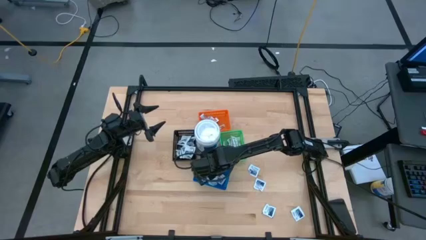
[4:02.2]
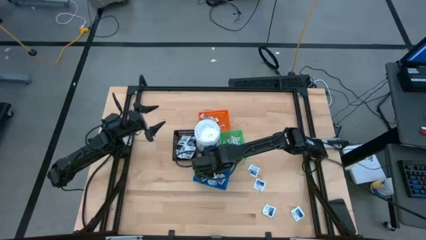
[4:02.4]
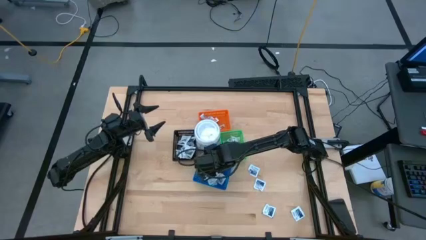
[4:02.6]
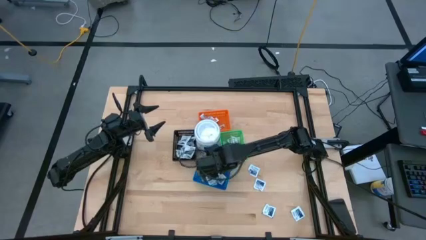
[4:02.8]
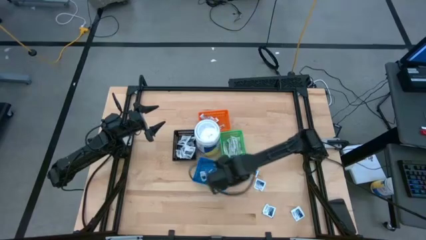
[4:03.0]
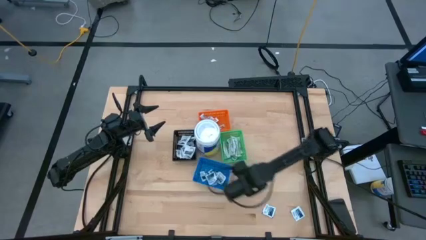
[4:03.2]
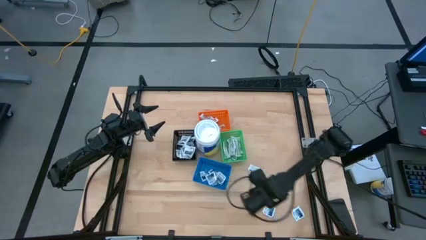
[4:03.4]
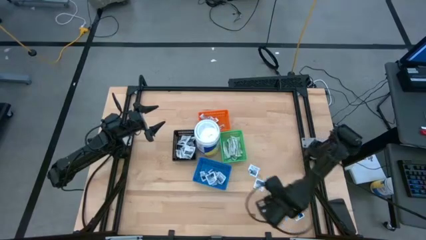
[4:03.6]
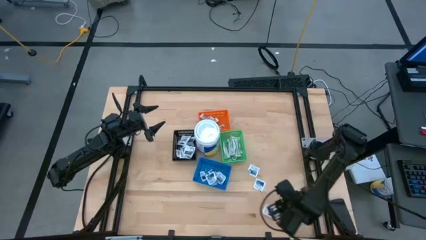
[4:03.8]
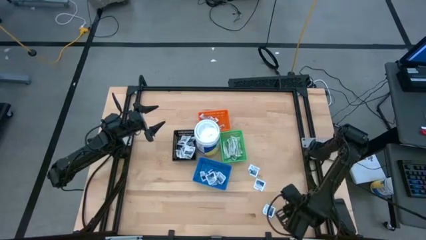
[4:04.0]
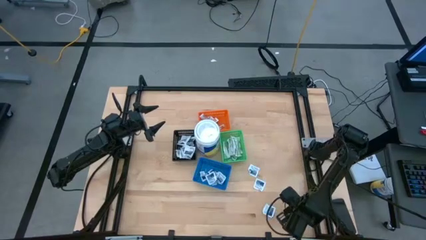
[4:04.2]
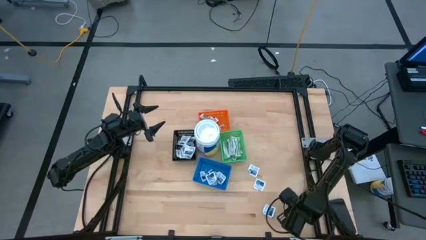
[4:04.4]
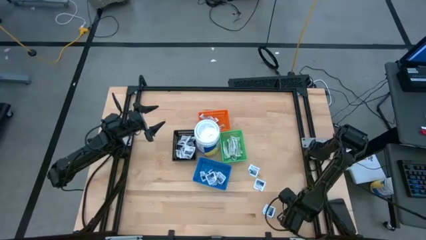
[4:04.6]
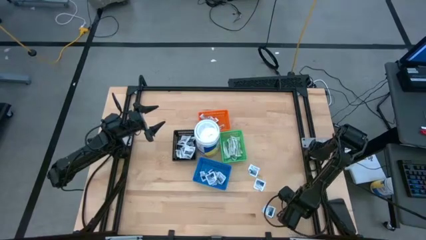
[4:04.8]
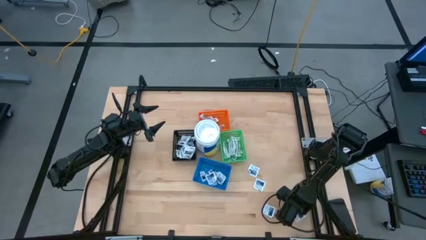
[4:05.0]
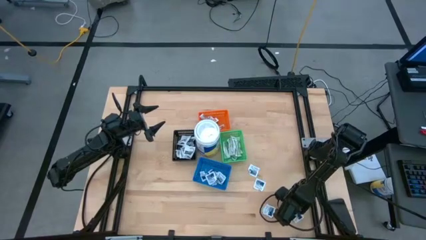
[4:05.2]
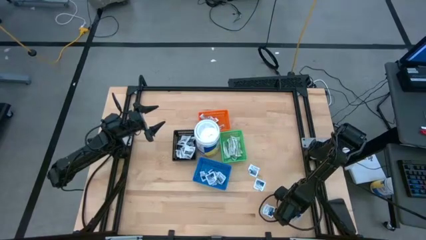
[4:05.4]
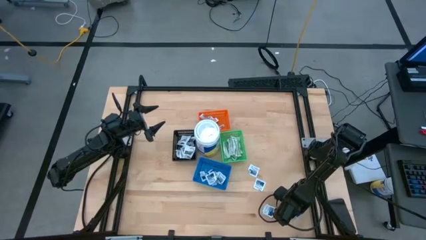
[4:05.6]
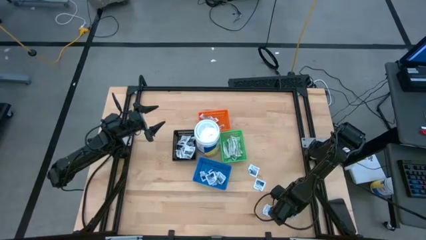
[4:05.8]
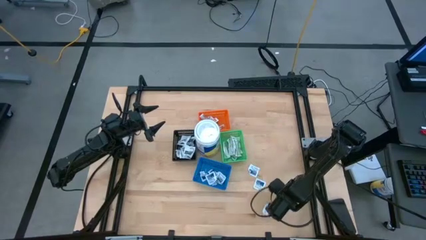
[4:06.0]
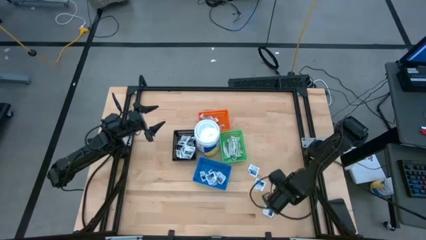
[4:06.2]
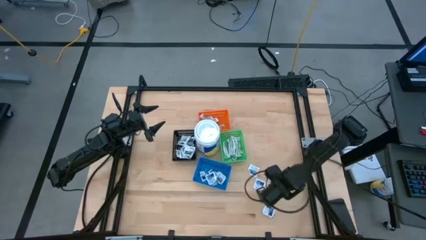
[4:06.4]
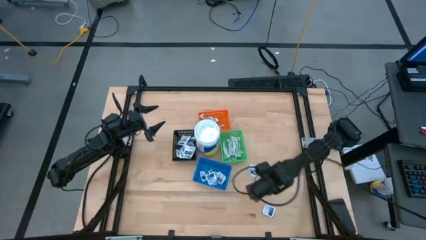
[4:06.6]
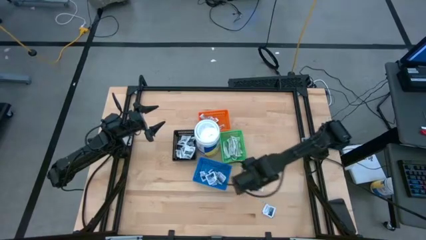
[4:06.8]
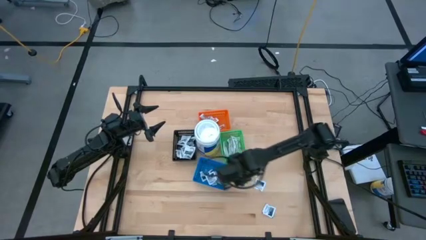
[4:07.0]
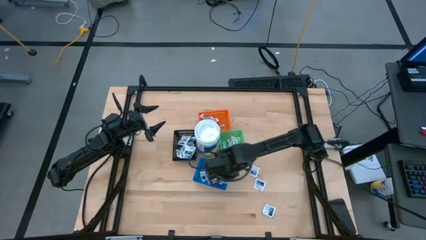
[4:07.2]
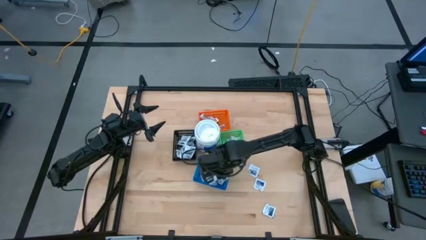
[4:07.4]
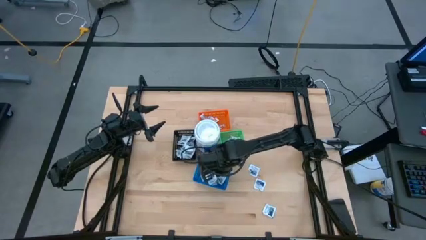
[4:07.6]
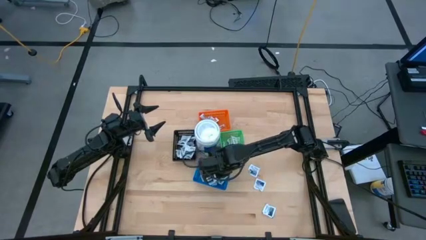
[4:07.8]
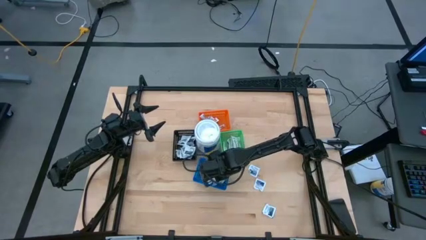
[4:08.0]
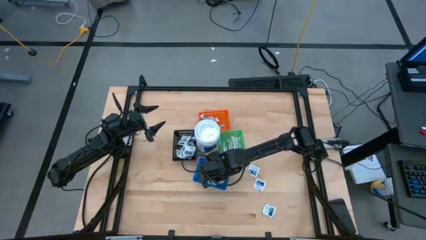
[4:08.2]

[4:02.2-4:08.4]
Task: Pick & Place First Aid Supplies
Put the blue alcohol pad into the blue bin

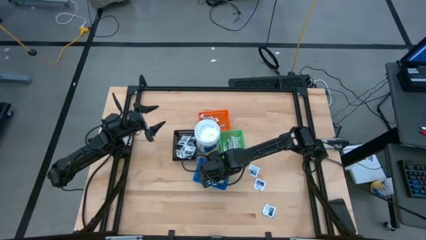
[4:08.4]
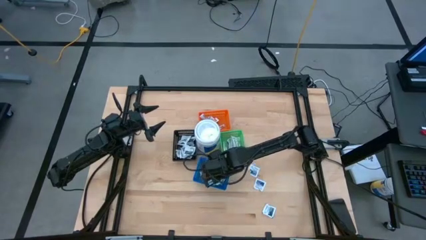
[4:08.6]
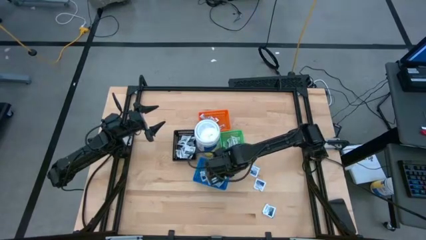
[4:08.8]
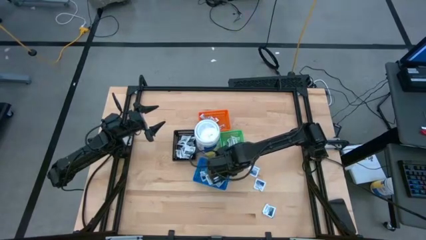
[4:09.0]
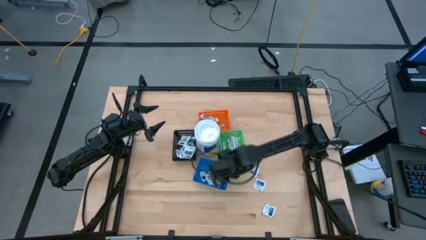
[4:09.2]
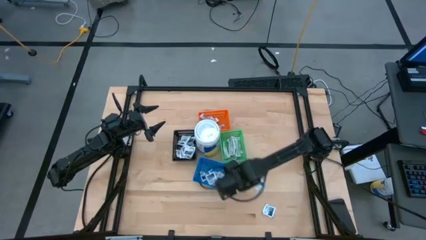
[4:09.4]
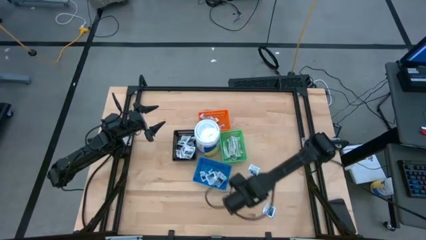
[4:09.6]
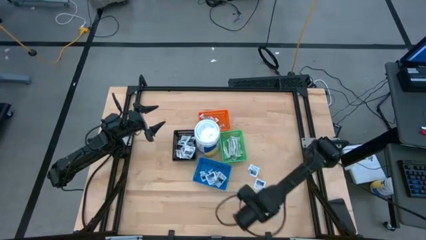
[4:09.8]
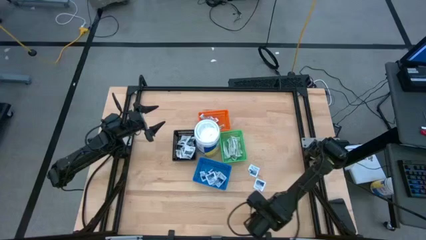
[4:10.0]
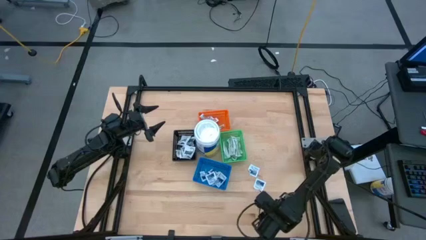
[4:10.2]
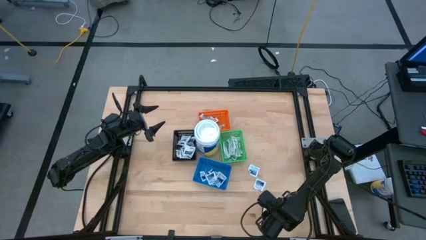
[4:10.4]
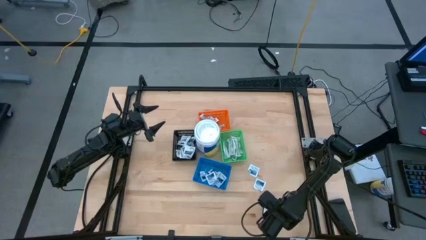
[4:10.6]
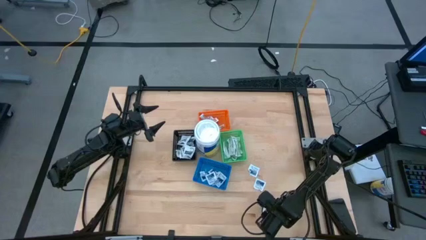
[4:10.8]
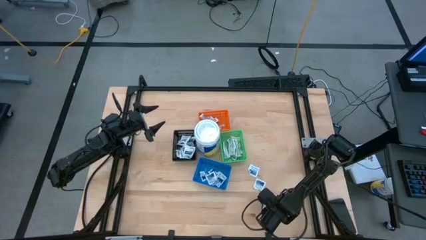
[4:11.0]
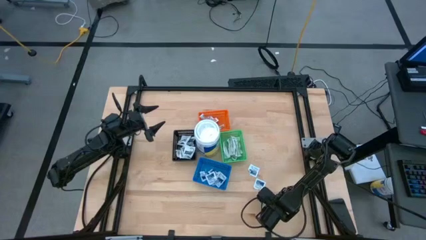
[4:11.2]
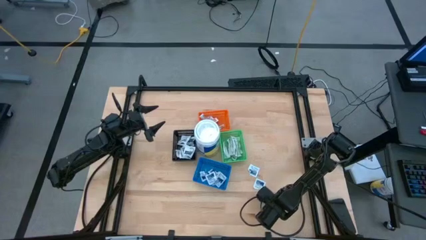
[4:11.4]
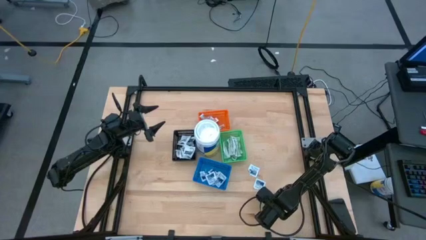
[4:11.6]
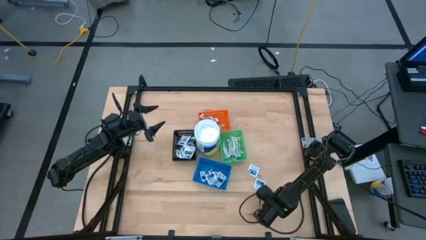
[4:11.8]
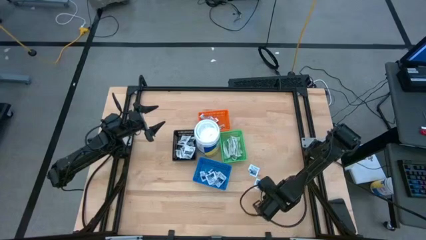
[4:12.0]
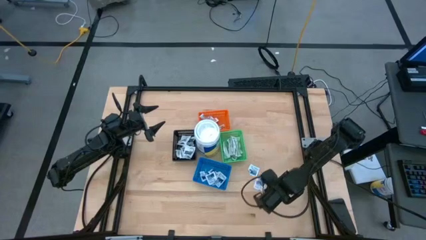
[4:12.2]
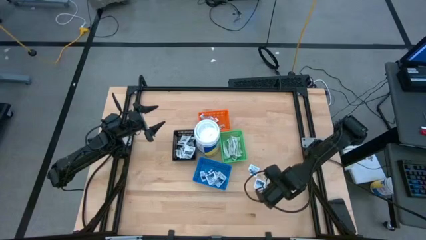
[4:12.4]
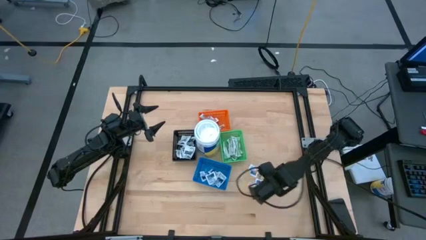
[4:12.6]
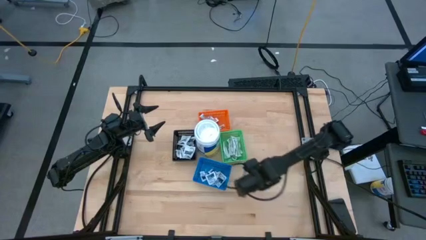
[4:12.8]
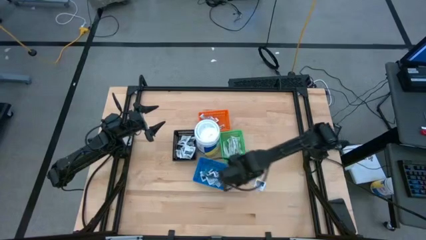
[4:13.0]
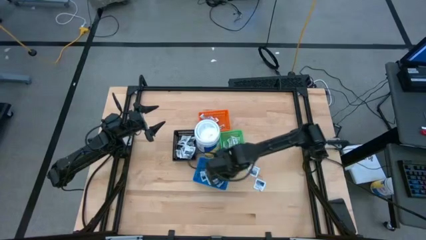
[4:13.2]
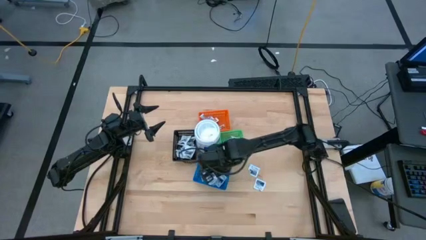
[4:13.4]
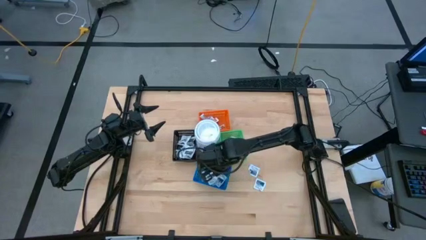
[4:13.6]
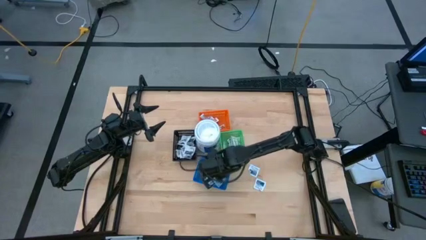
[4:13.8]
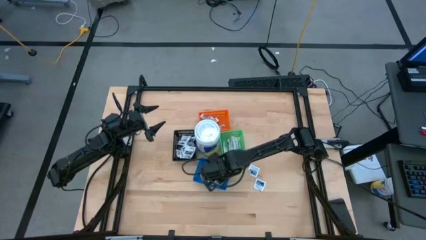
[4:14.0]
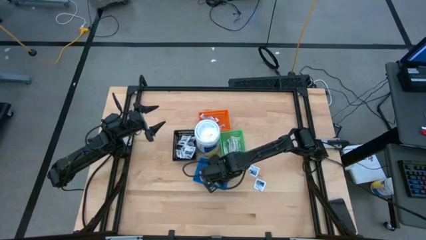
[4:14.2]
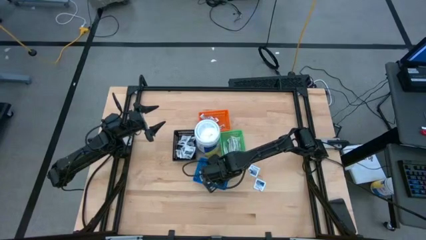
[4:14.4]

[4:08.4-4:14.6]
Put the blue alcohol pad into the blue bin

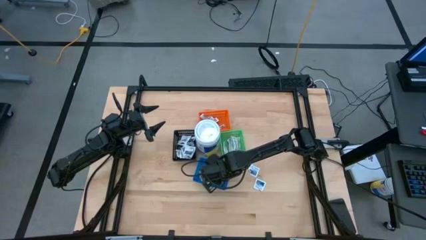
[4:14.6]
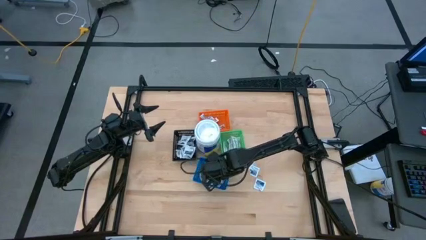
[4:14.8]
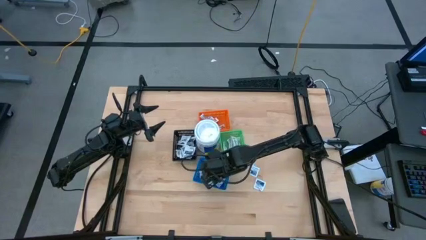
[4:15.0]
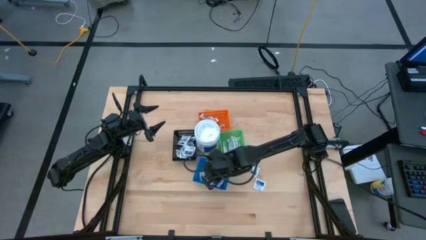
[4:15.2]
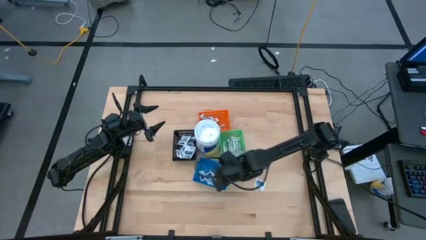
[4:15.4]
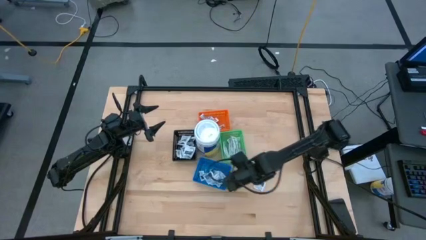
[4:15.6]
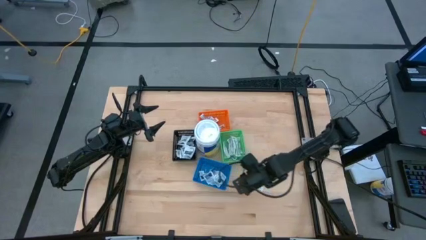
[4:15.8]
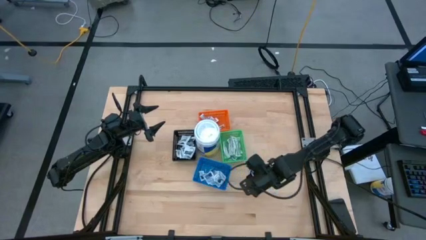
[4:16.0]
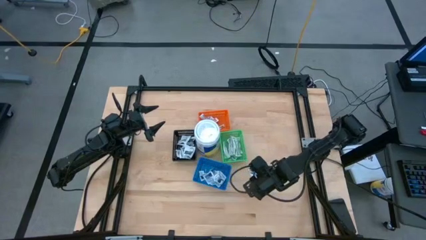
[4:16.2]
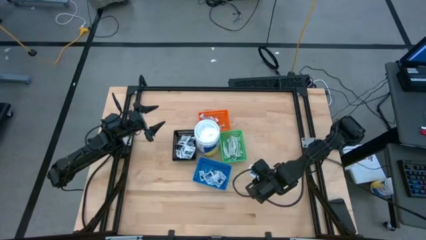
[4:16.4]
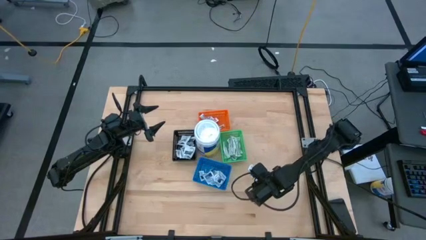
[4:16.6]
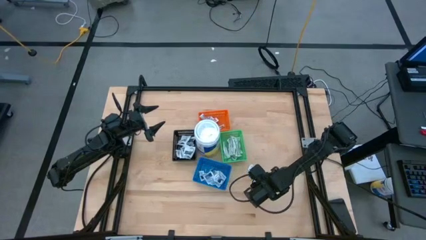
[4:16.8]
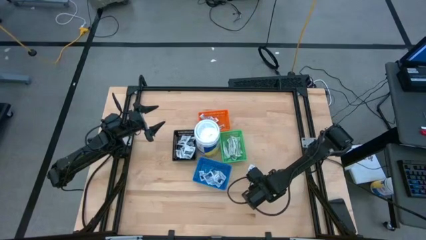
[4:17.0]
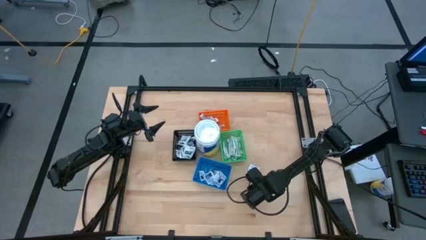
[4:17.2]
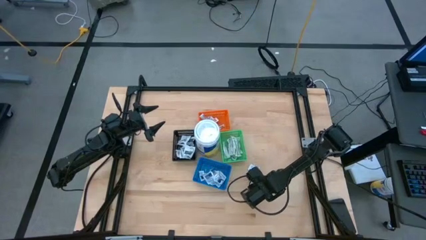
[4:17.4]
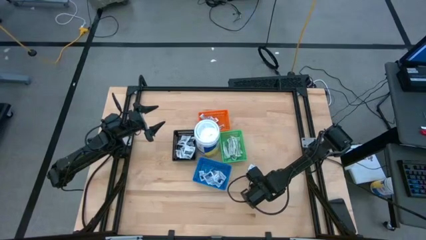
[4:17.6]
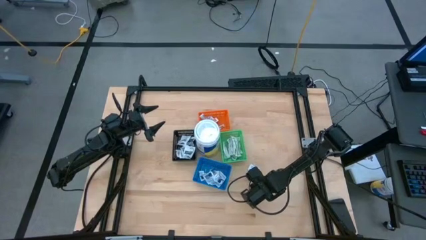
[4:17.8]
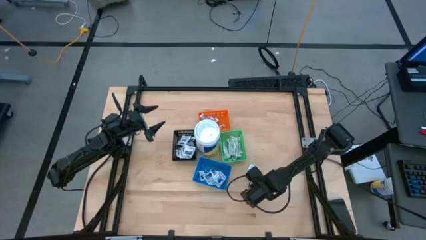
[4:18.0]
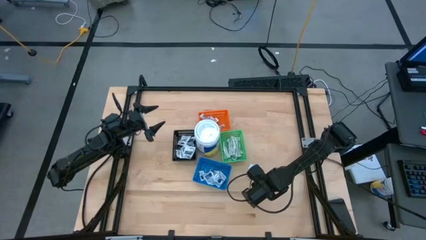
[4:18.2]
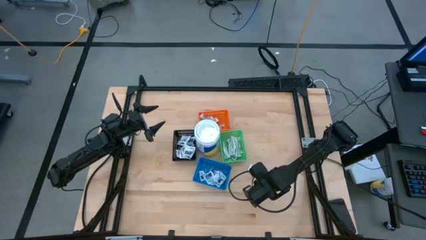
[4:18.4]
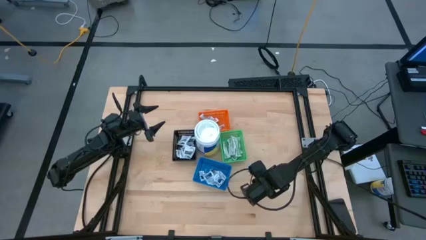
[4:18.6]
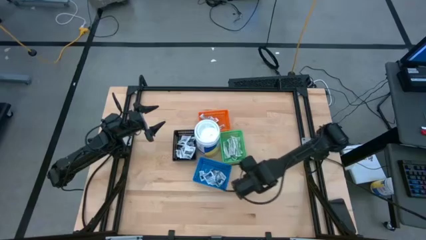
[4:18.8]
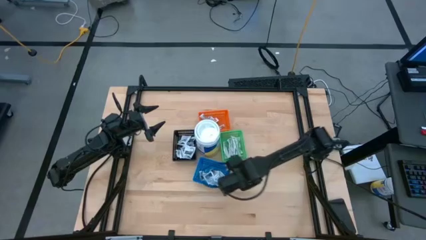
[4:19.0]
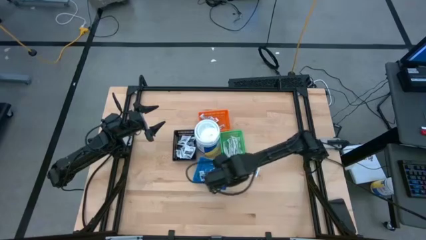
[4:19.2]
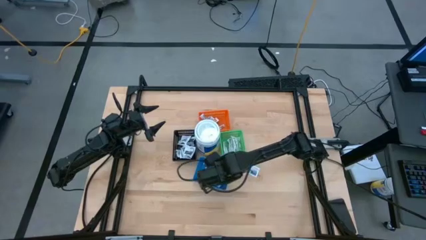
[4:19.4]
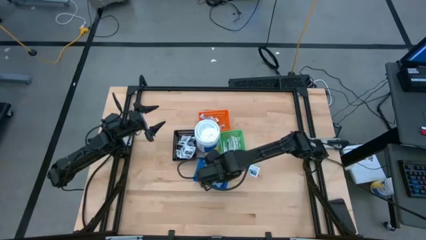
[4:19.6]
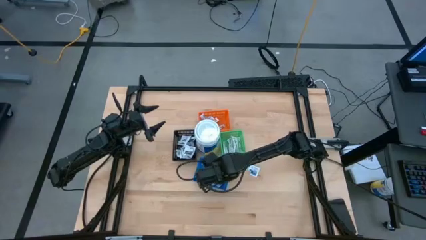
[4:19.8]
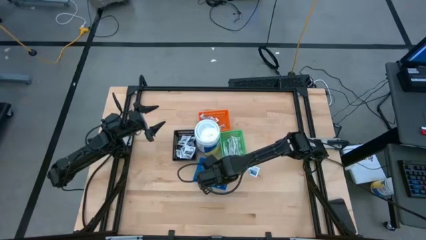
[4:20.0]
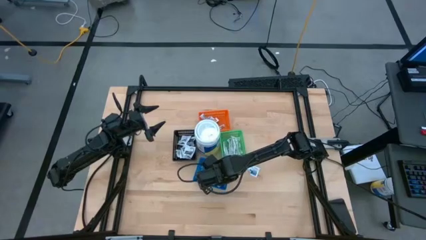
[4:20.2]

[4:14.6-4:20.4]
Put the blue alcohol pad into the blue bin
